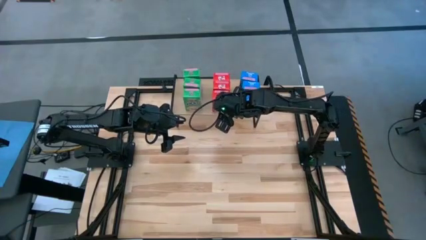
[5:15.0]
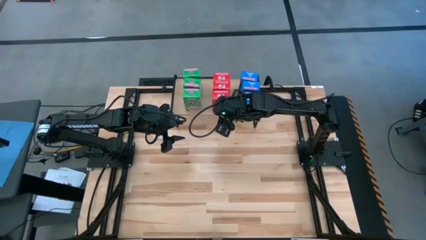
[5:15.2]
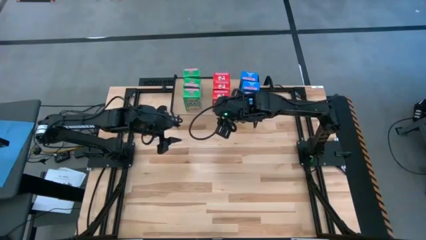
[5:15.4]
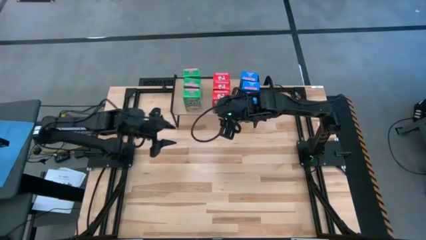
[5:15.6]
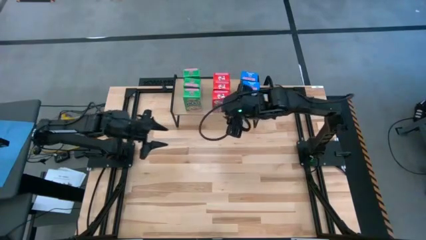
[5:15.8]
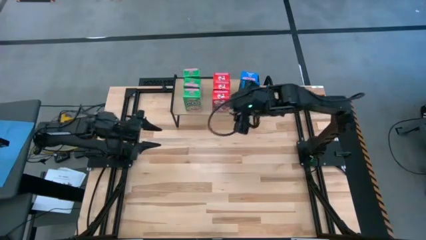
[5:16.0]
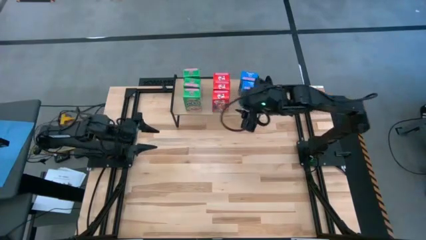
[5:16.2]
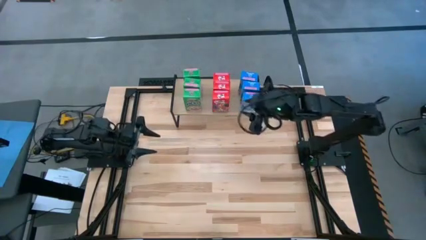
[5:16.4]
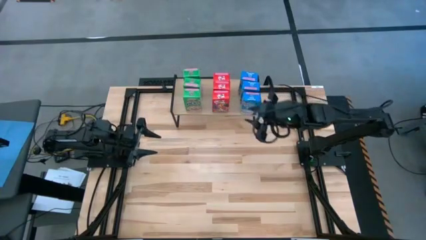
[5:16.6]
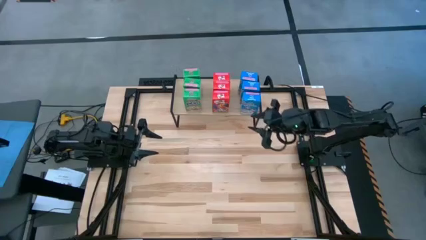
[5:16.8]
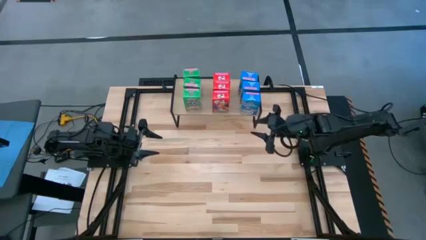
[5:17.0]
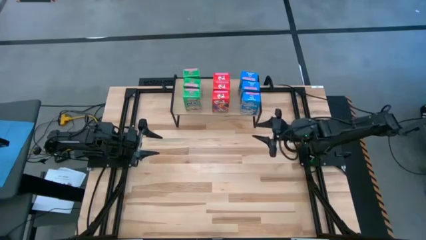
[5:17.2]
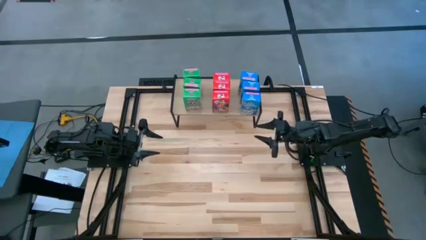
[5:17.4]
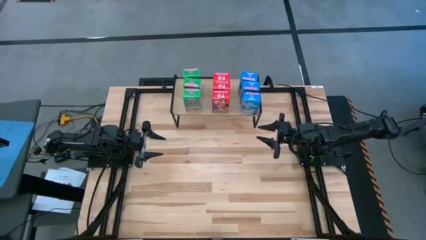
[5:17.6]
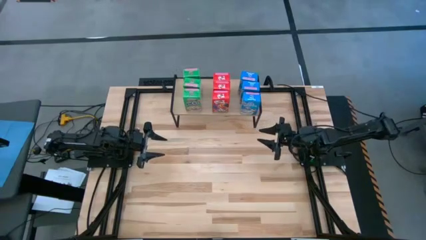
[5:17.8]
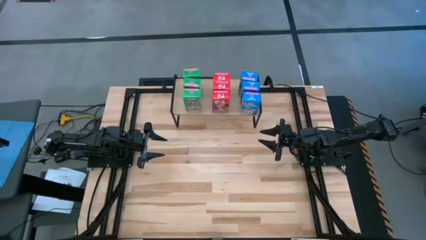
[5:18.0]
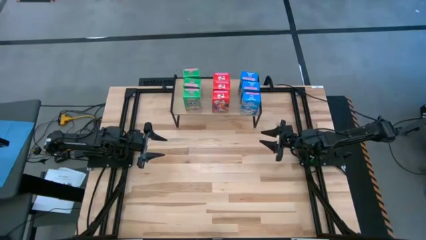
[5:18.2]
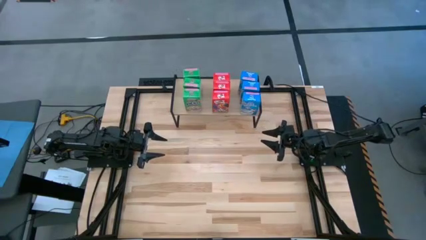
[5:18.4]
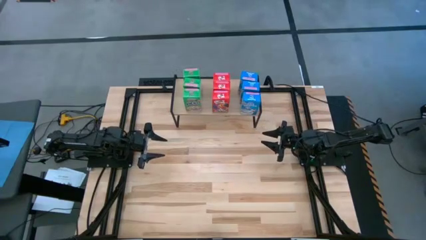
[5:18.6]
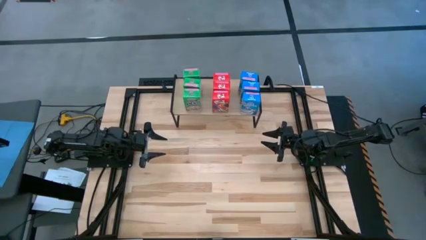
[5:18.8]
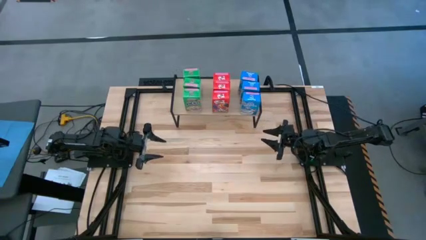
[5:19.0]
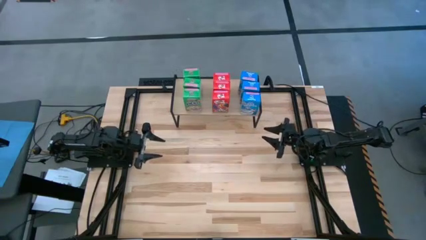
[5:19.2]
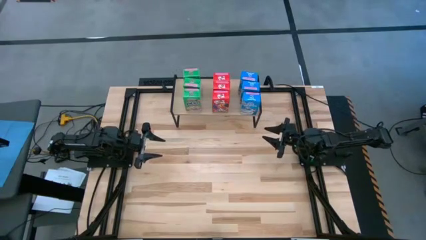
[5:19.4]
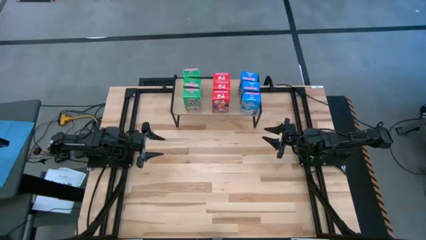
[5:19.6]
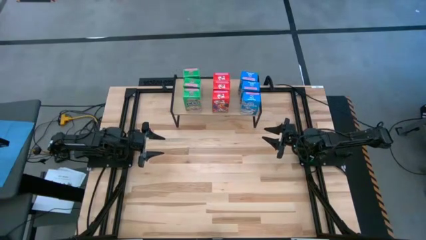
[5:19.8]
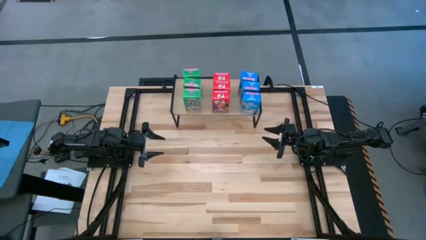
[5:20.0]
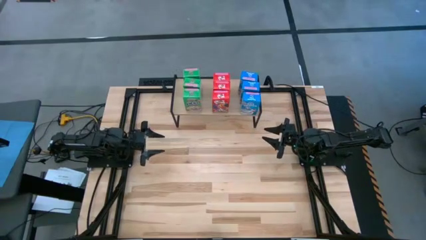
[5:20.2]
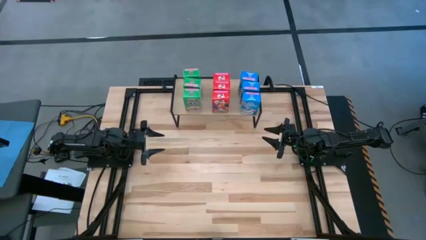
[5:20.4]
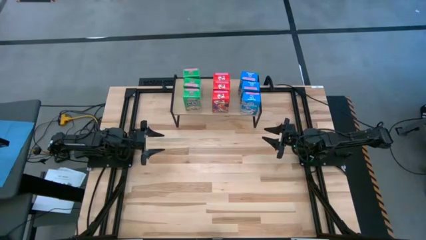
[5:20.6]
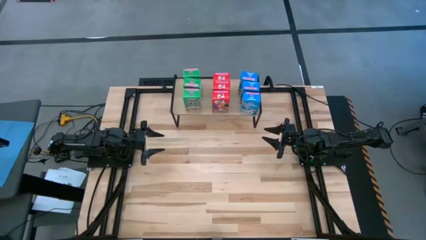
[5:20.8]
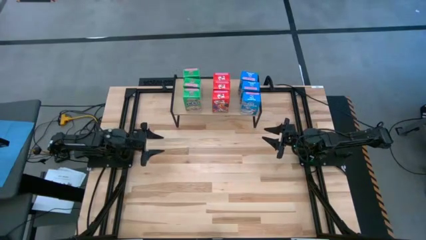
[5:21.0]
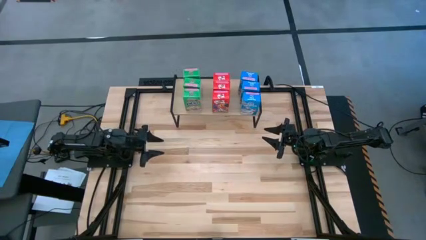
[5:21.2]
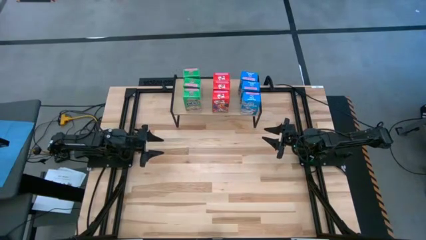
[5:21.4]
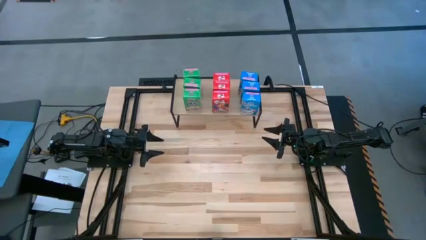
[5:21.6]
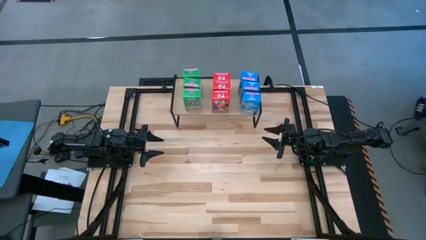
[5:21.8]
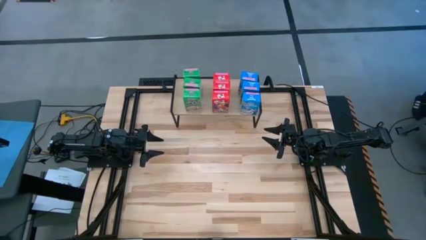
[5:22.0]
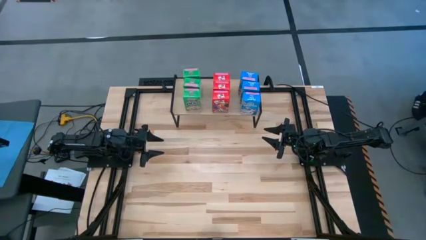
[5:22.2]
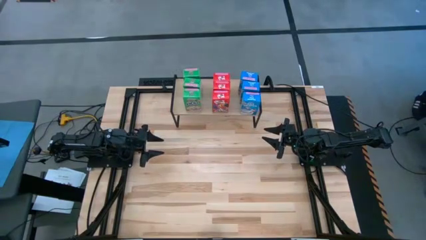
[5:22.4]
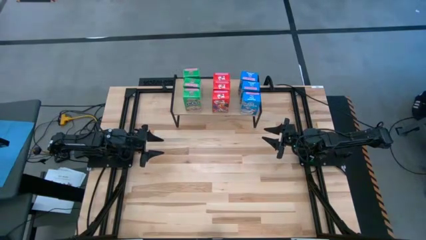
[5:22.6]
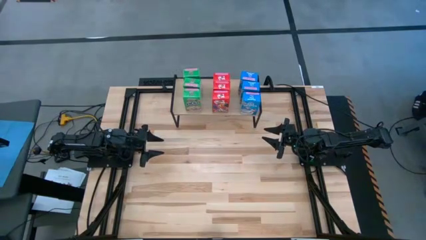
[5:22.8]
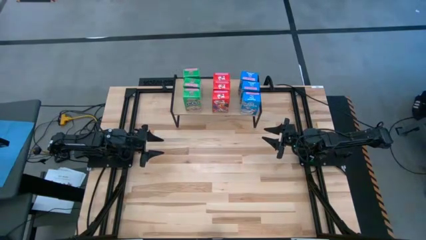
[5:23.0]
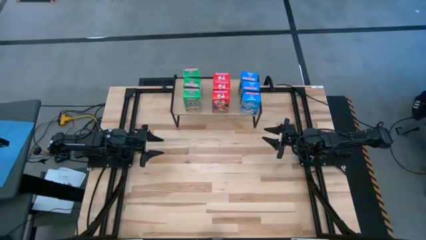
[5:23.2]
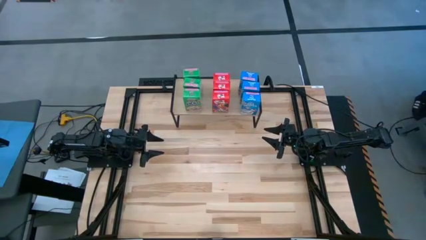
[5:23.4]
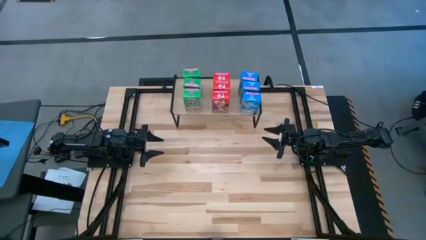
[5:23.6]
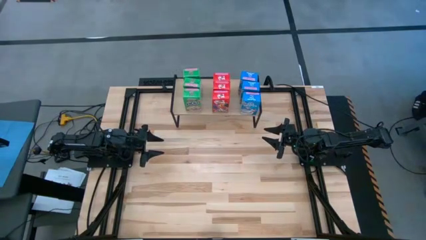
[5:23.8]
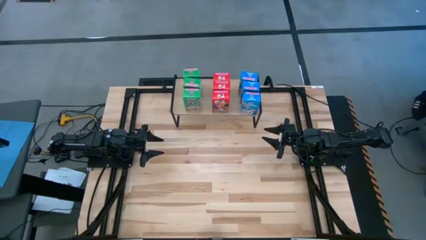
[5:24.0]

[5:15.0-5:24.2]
Task: Stack cereal on shelf
Return to Home Position

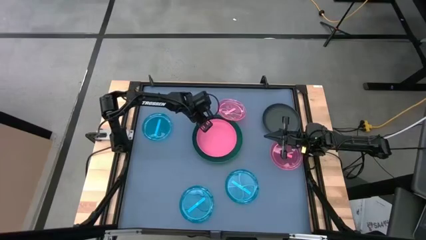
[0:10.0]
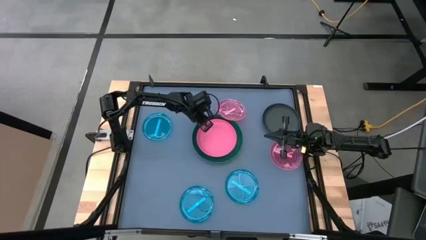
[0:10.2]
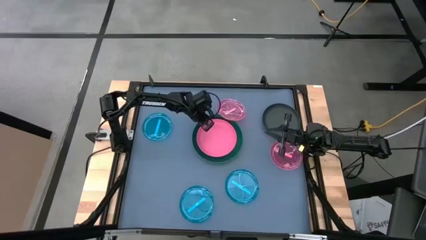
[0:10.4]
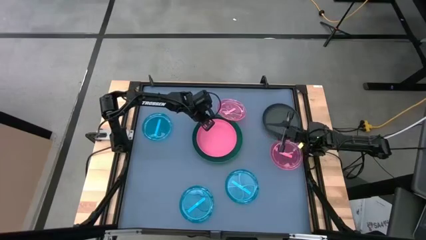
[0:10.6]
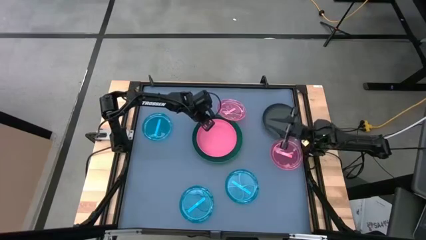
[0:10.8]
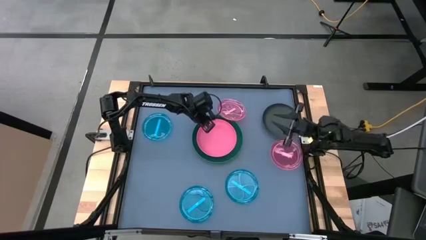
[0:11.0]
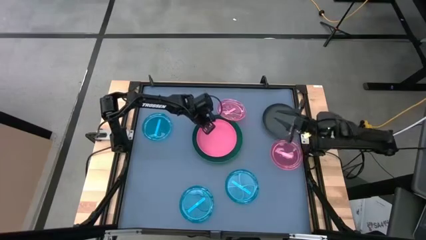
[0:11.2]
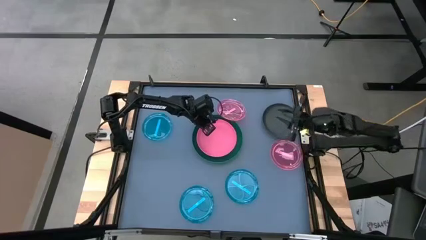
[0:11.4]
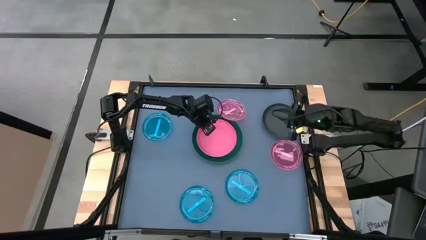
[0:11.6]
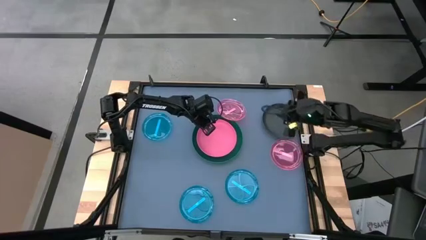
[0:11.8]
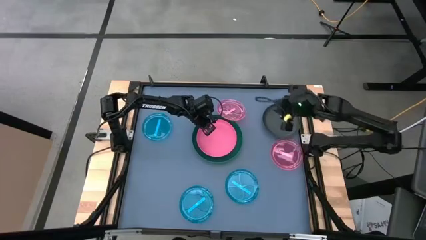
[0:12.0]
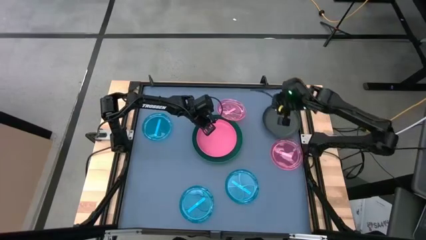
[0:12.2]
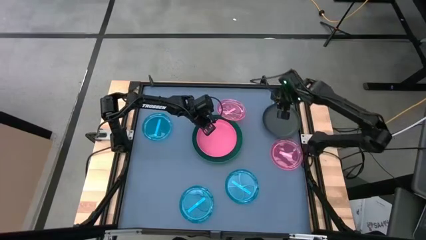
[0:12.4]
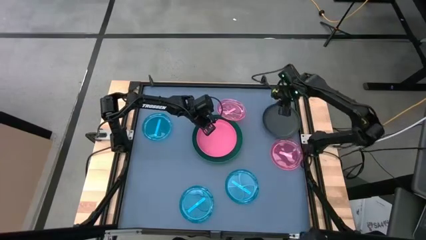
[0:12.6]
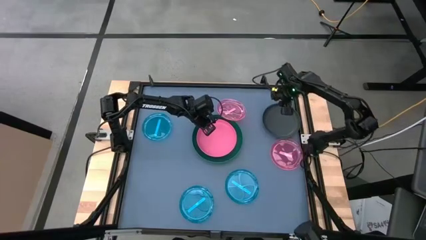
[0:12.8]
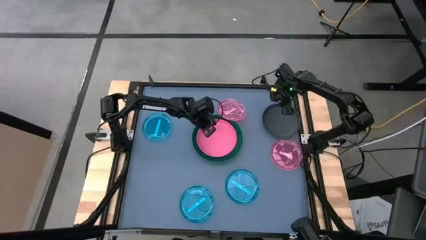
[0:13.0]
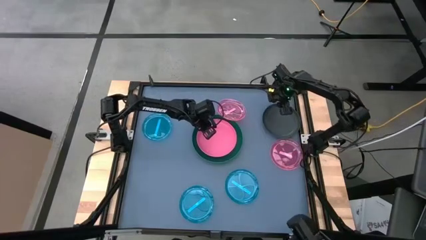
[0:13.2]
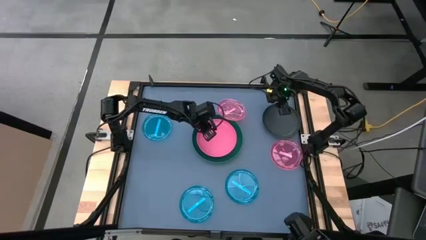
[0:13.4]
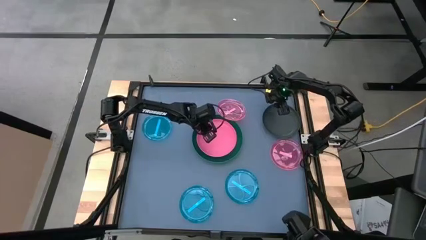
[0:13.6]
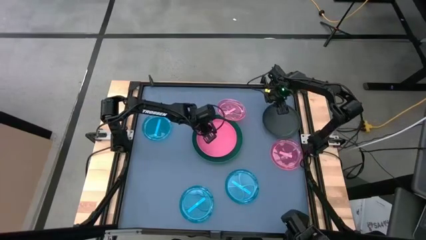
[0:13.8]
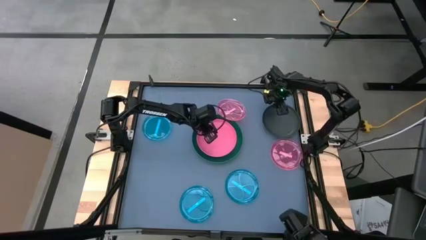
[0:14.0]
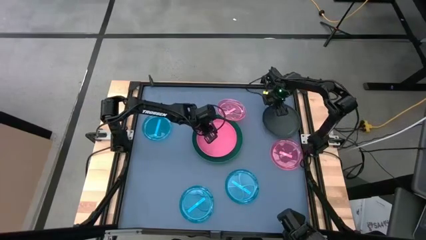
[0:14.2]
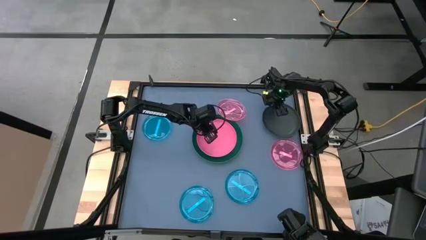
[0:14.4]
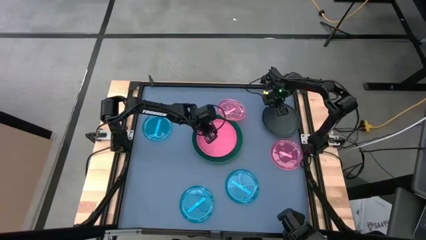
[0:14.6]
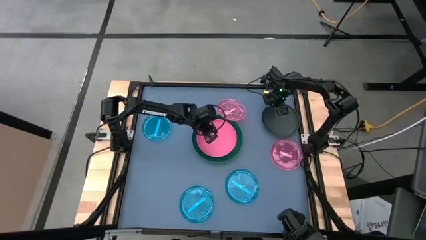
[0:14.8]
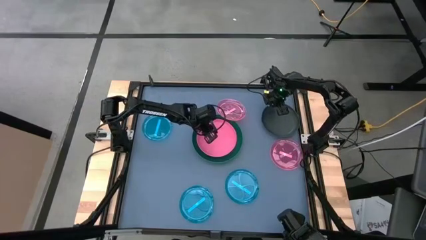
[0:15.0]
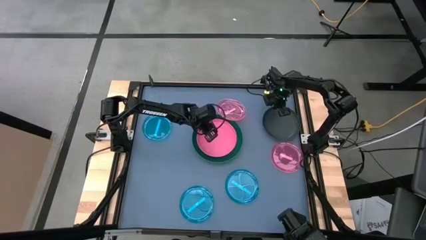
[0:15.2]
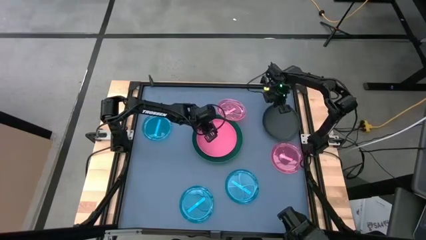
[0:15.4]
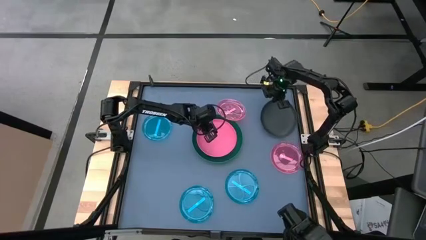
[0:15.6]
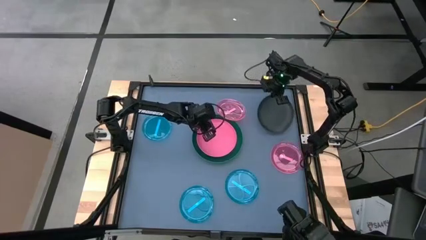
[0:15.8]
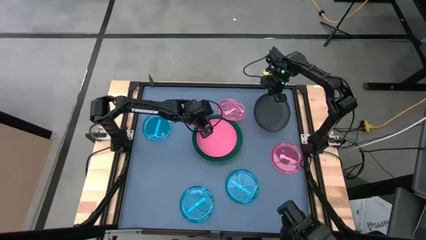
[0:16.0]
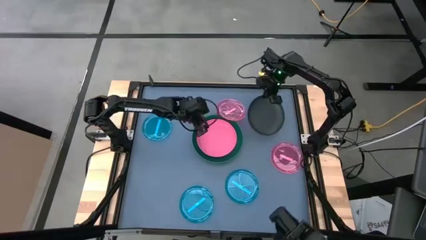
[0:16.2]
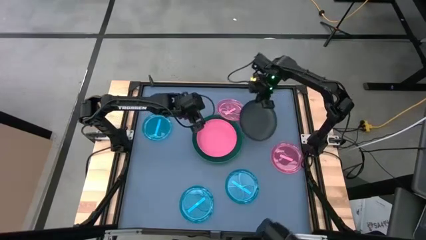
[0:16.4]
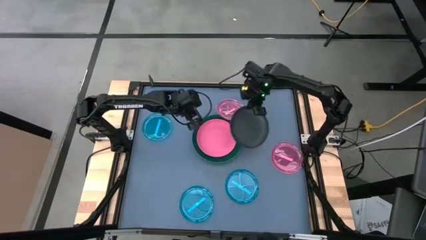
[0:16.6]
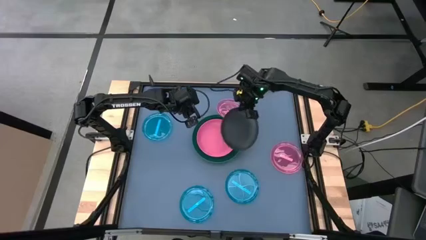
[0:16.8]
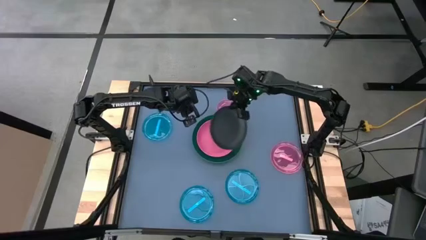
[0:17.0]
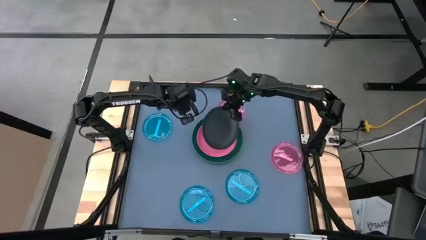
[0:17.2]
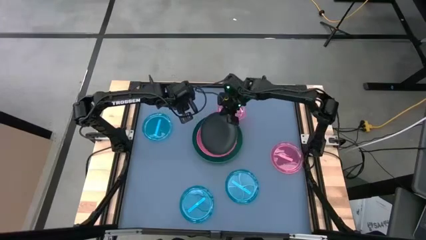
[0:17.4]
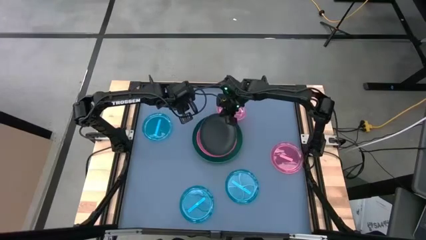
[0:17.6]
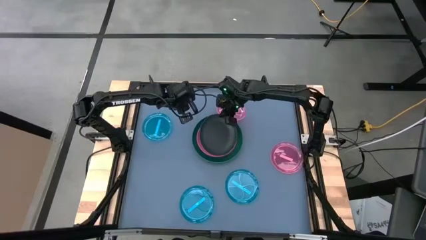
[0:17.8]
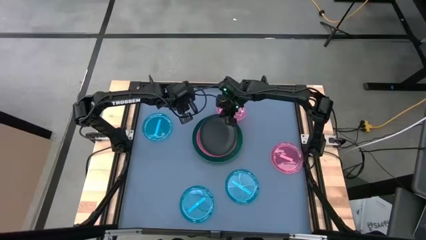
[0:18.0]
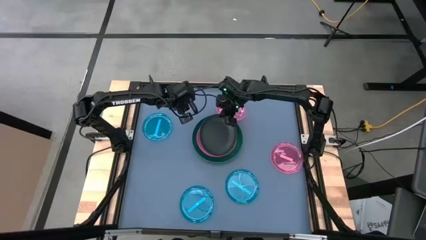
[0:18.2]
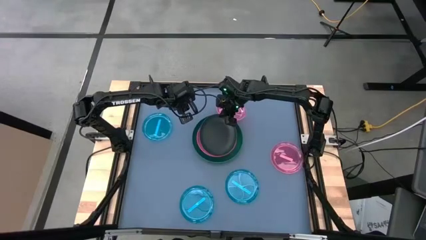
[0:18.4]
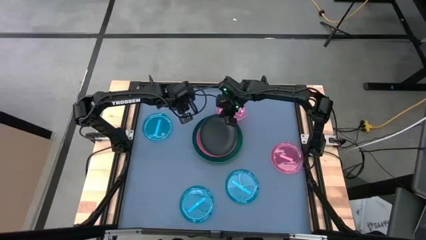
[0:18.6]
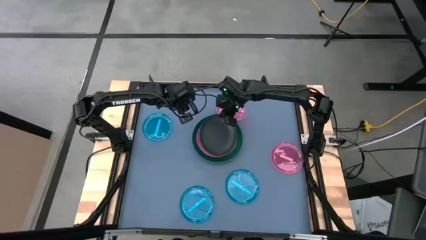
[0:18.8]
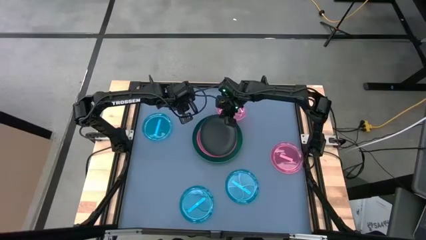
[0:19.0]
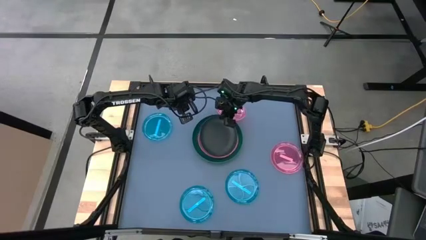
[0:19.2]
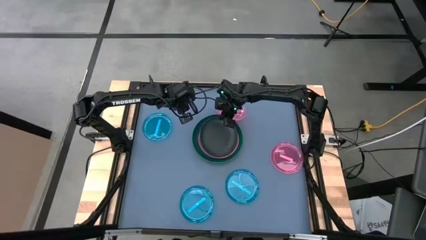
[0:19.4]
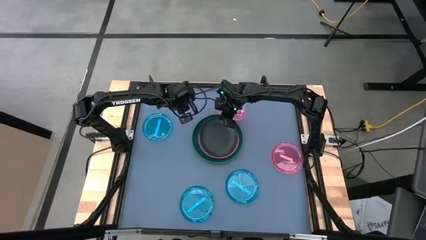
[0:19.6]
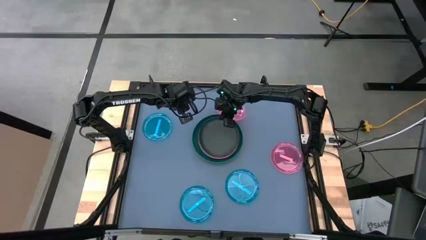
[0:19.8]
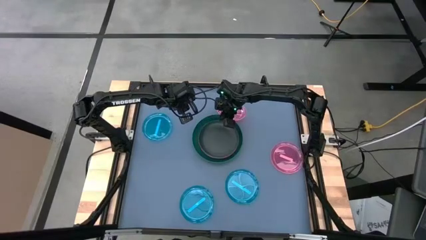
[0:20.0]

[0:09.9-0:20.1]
Task: Stack plastic plates
Stack the black plate on top of the pink plate
